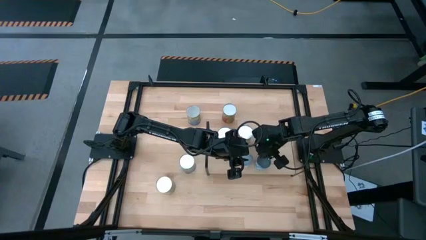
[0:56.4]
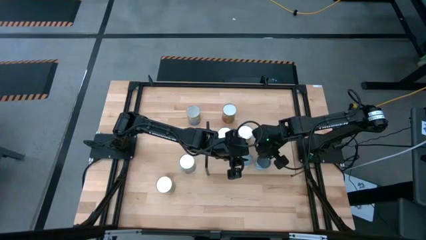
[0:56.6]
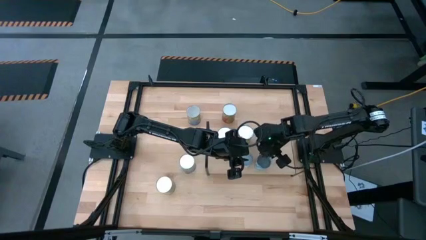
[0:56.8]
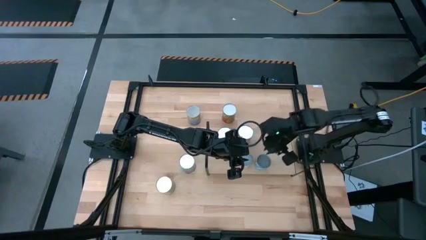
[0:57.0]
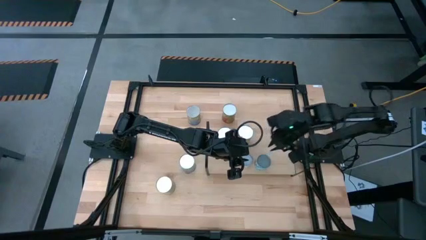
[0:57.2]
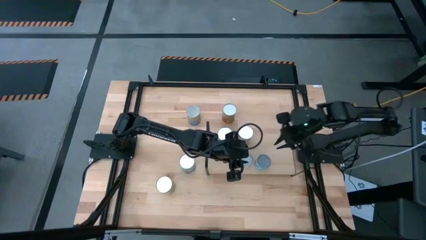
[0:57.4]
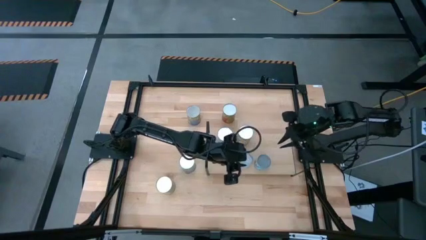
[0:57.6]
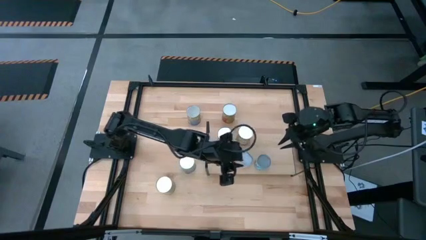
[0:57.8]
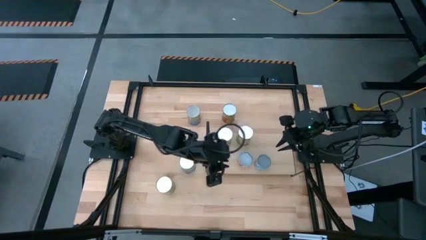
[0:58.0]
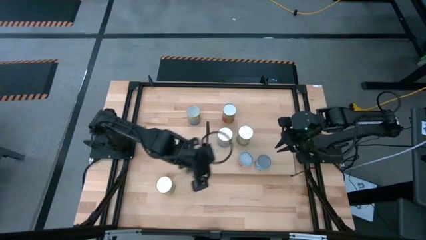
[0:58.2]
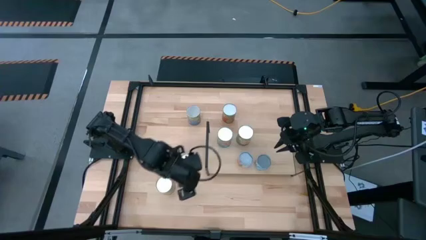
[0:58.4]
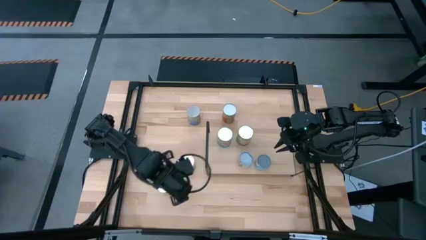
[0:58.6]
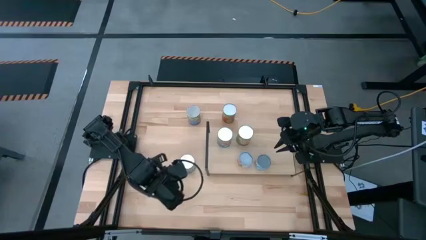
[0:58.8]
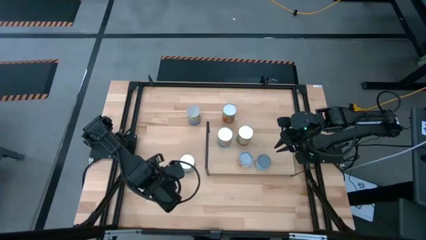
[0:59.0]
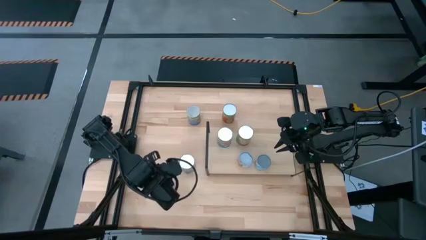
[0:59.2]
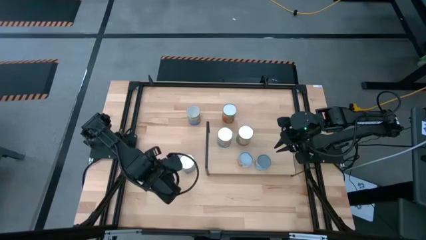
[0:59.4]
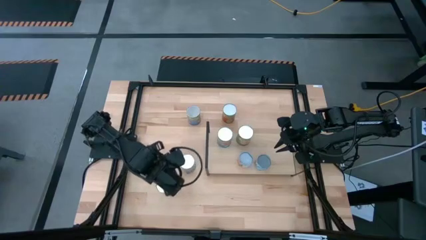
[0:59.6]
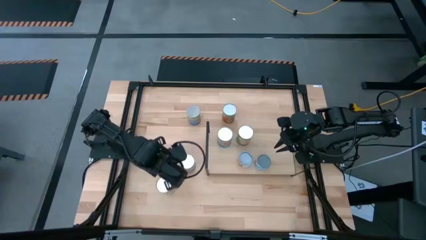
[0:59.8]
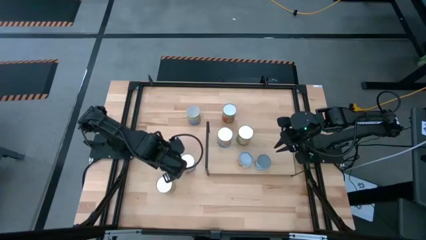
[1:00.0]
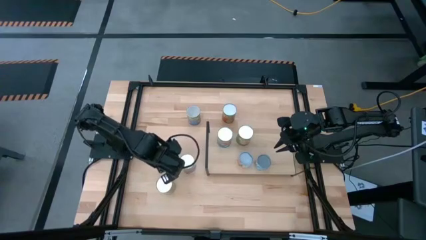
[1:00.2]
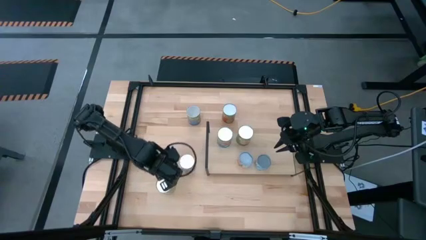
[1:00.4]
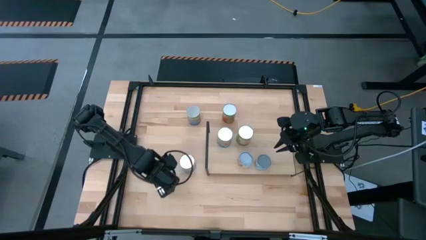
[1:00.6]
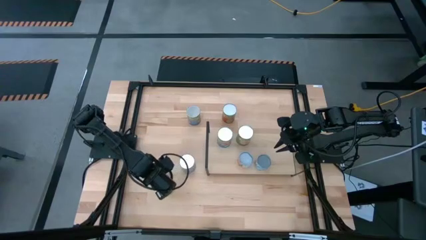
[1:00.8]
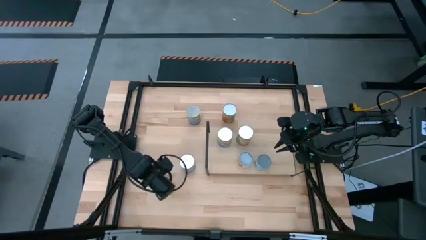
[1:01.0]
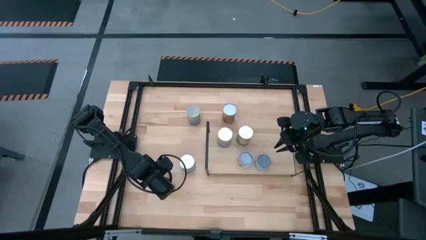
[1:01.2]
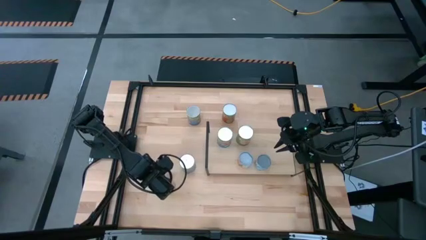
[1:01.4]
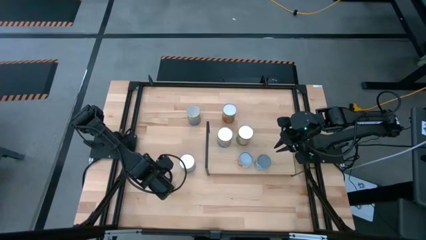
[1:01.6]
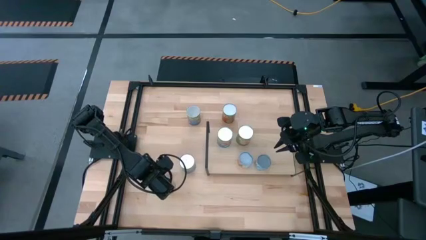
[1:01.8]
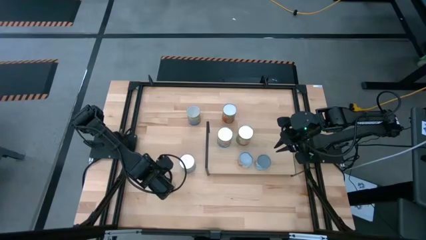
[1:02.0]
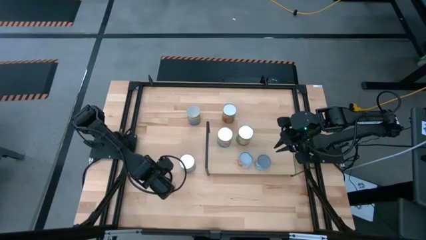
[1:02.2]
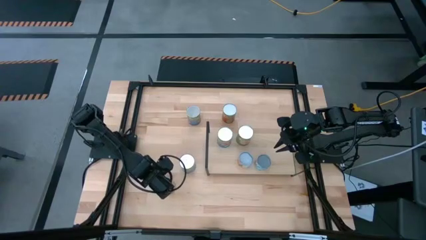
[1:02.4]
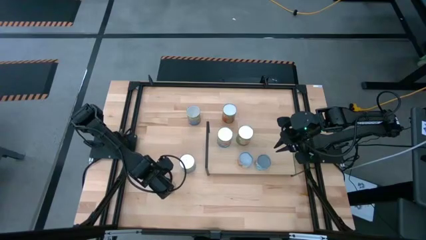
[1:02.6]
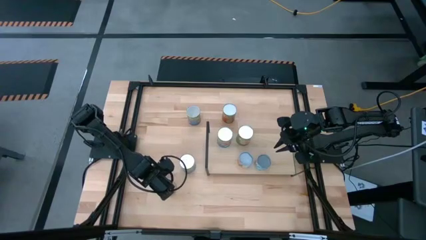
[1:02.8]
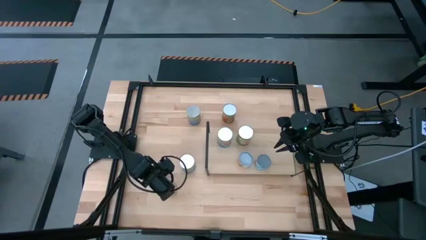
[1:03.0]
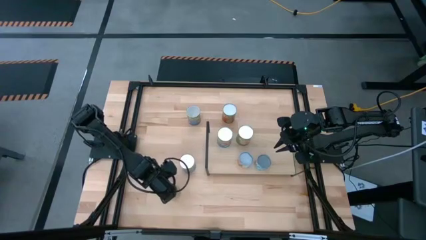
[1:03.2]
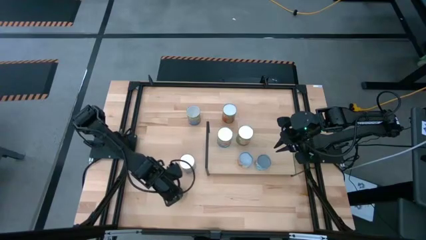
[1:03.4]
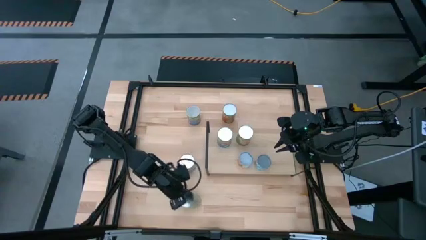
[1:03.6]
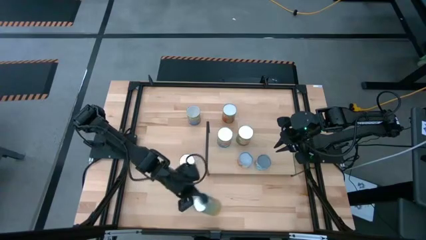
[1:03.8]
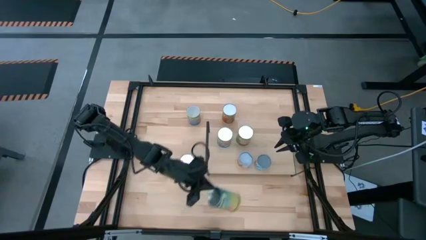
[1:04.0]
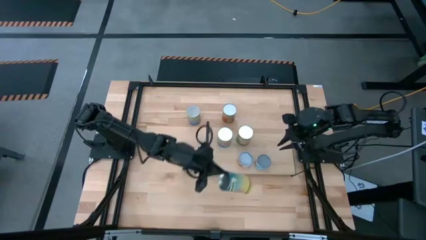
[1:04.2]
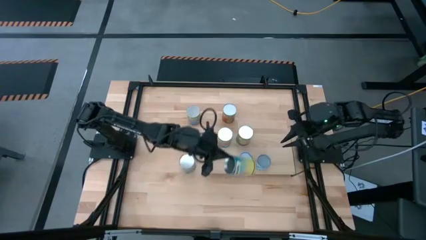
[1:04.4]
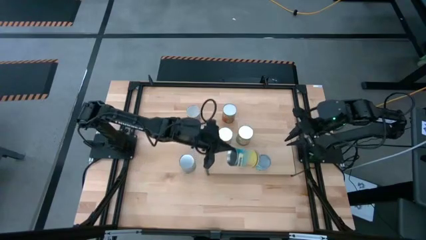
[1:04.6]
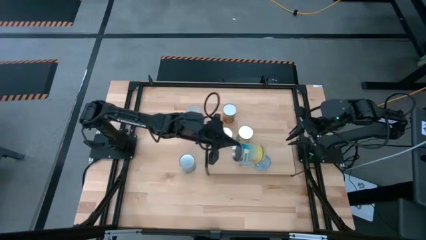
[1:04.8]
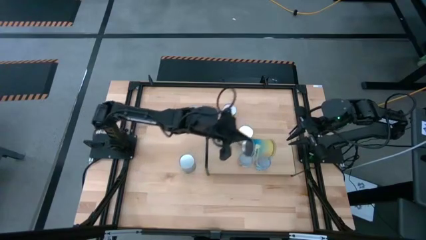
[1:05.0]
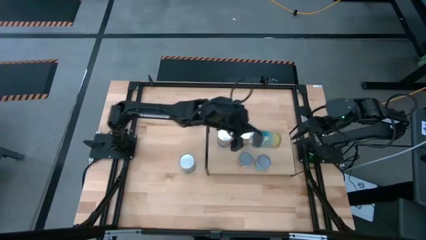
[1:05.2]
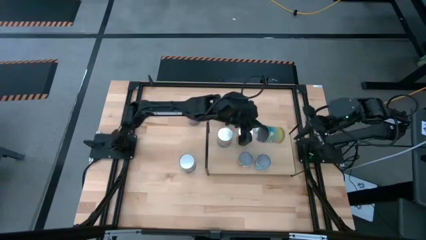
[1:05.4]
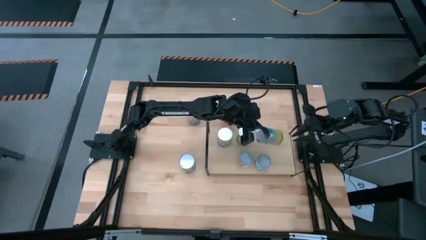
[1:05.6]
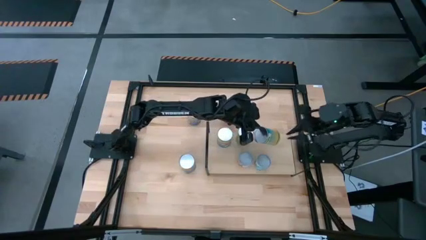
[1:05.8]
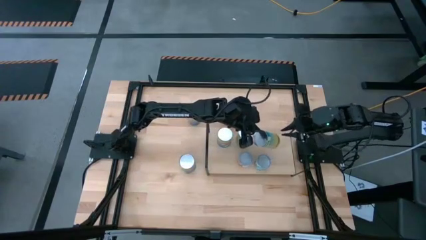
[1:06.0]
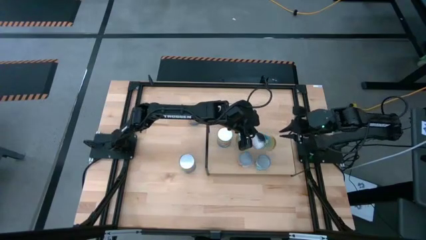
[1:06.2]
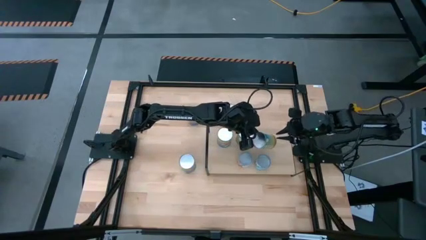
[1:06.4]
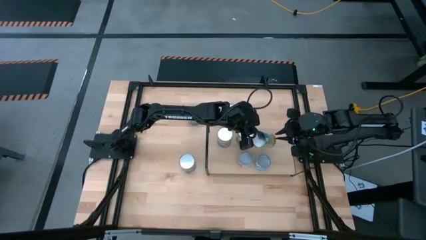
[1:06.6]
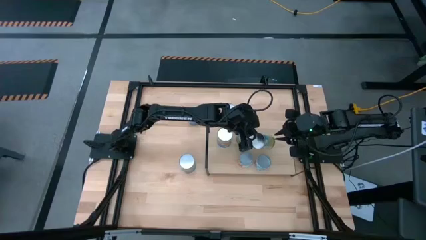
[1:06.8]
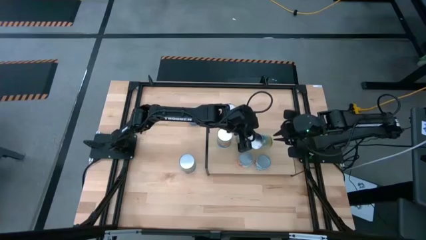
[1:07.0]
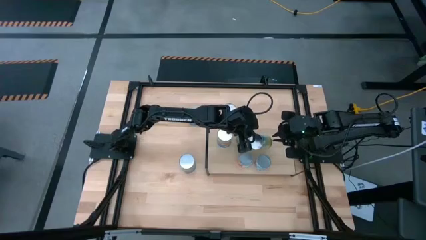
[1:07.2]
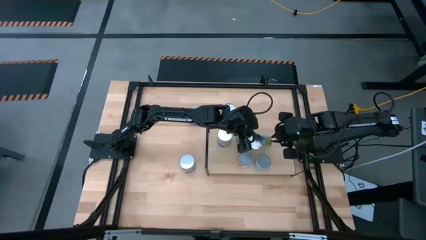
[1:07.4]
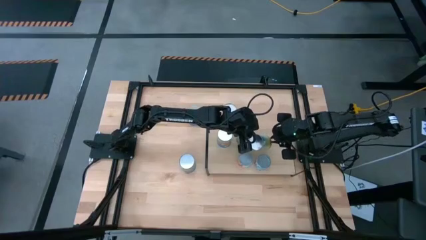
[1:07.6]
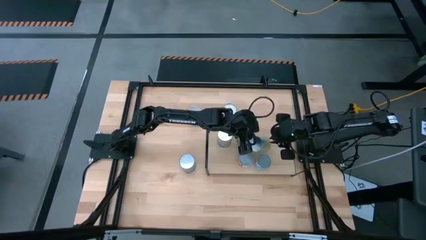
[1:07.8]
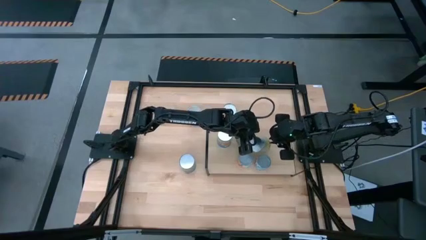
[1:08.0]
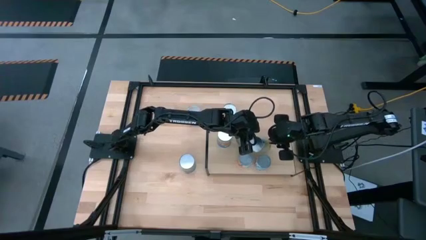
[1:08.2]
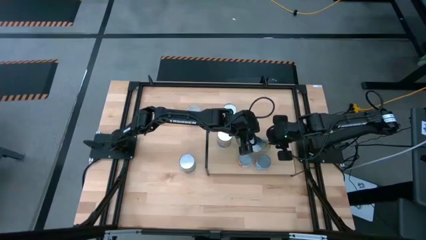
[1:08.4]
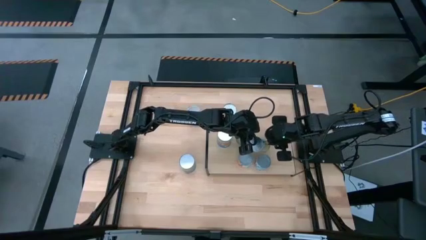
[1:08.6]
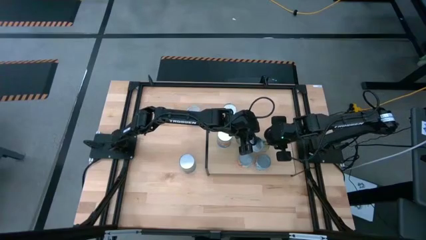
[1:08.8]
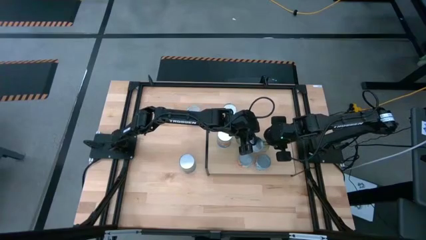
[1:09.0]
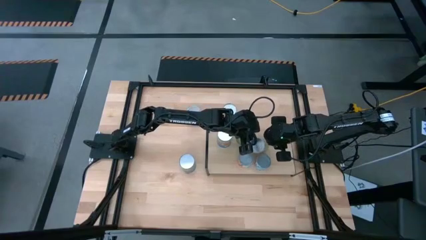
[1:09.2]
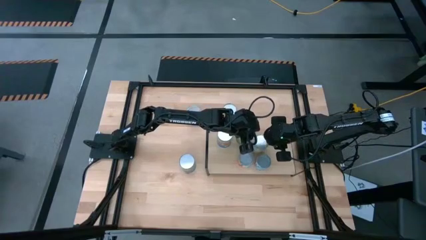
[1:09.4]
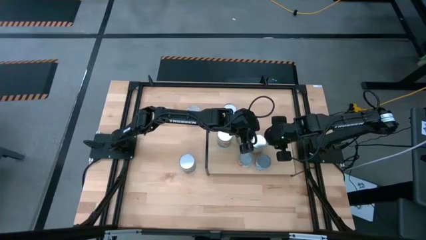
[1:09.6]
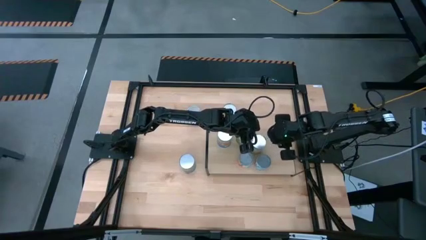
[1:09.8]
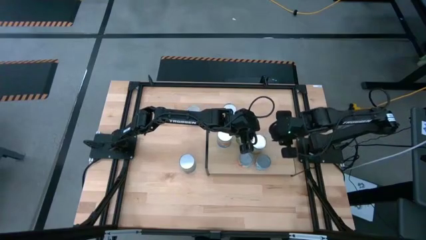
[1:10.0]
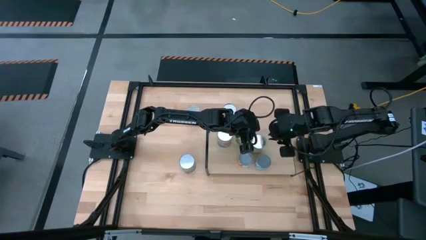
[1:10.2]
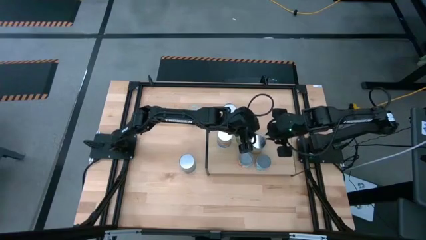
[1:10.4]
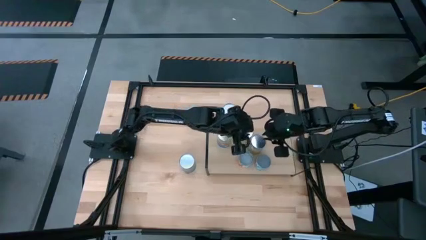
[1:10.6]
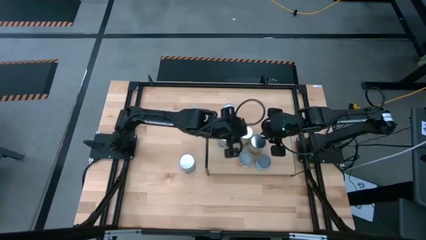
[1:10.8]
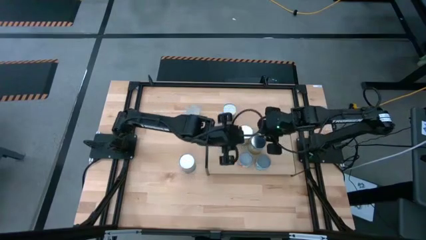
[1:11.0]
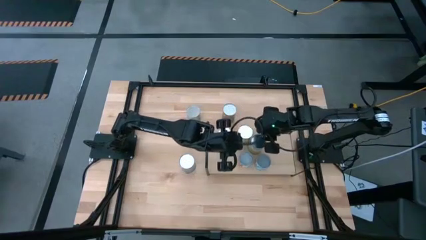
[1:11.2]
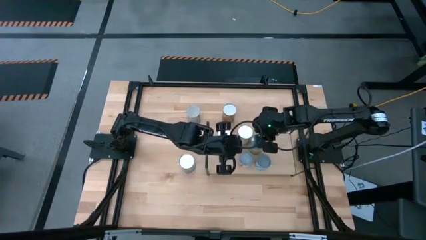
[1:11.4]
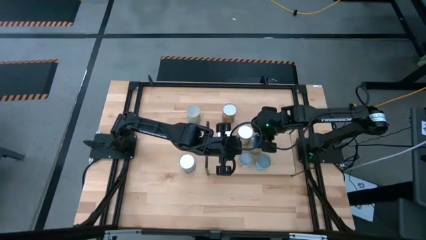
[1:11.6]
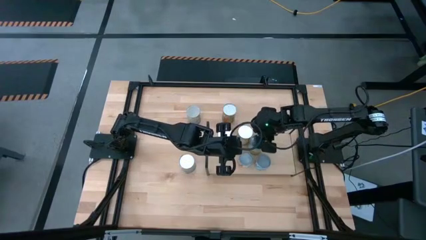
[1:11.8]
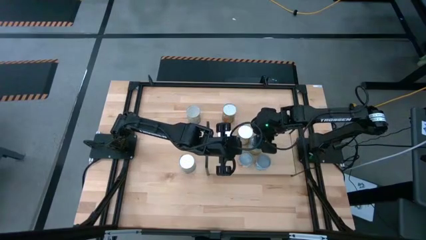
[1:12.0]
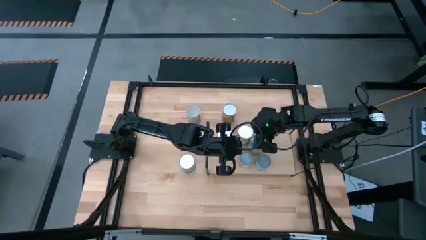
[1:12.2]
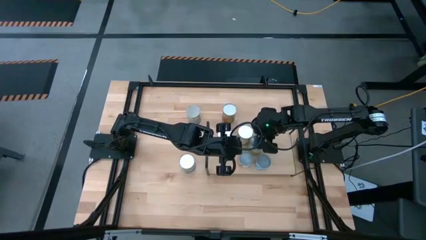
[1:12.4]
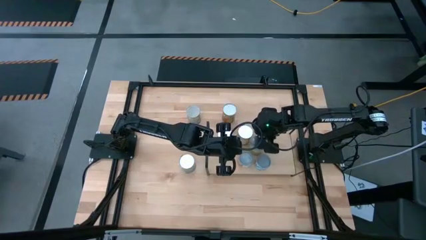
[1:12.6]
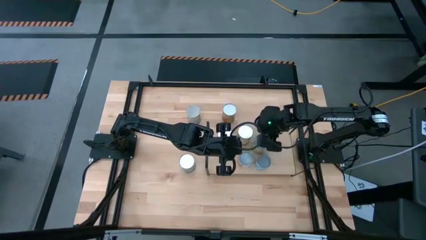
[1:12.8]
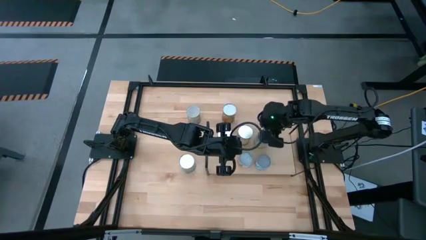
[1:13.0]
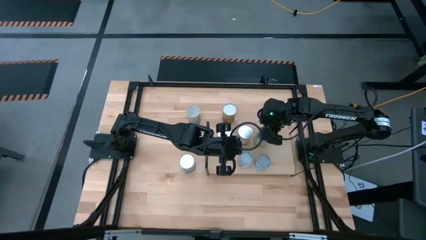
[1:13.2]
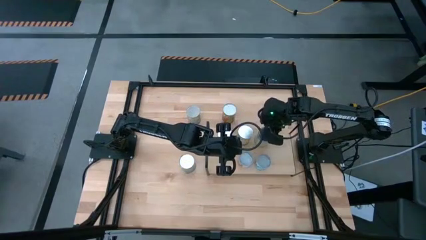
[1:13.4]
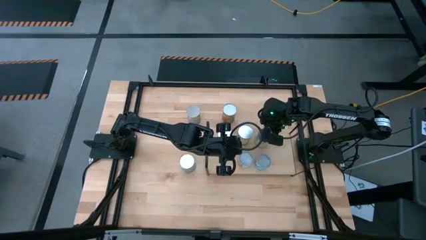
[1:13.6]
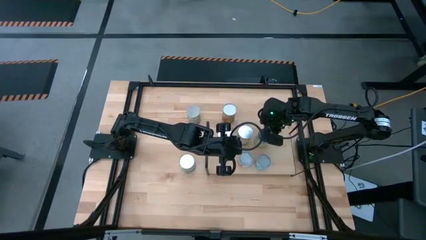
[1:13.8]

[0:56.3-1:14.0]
Task: Pick and place cans onto a shelf
Put the canned carrots on the shelf
